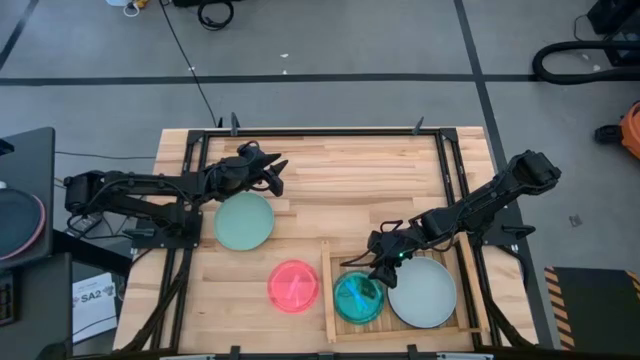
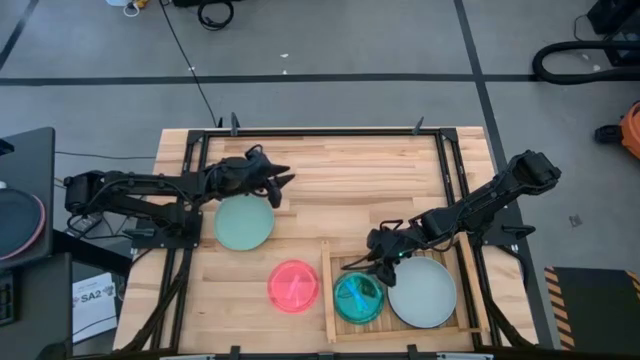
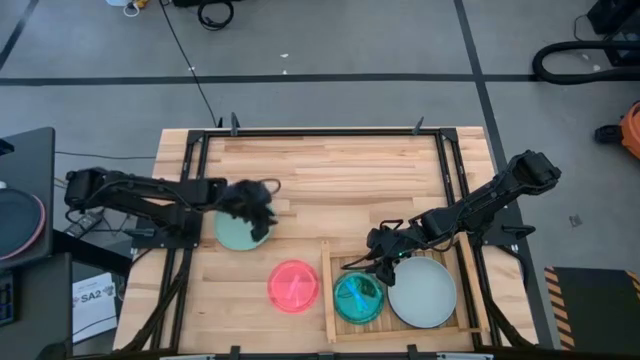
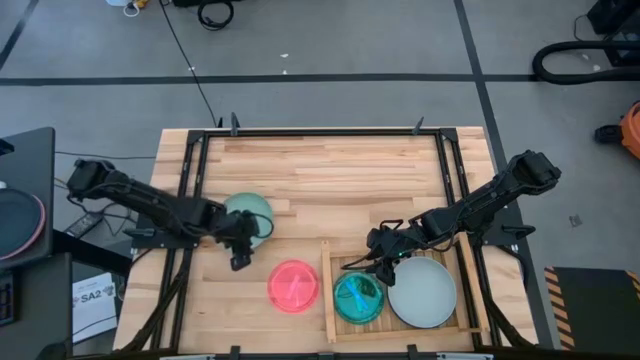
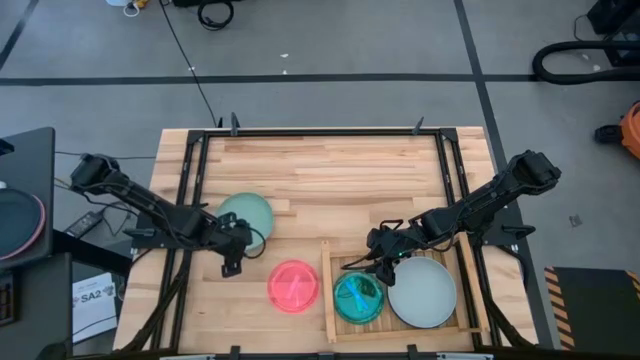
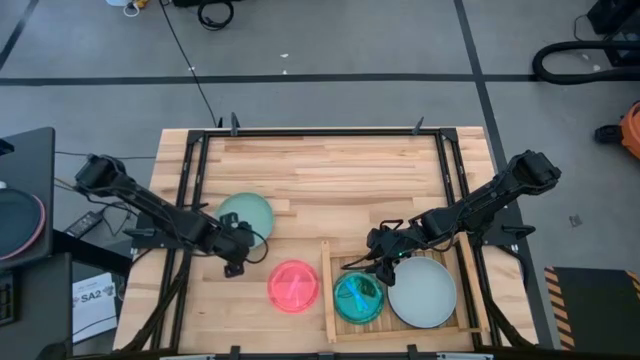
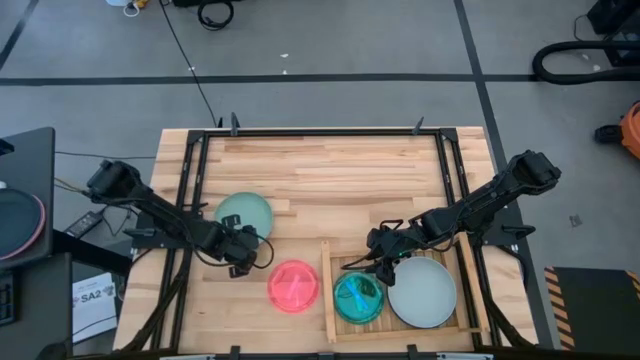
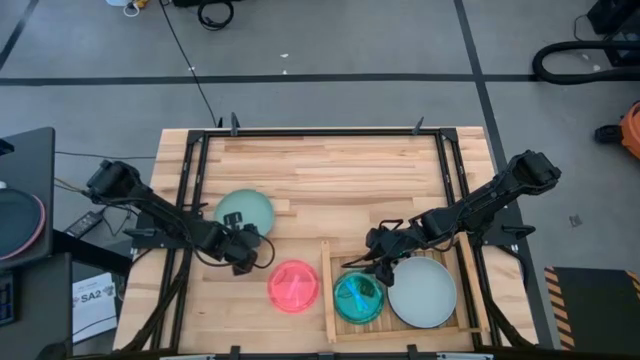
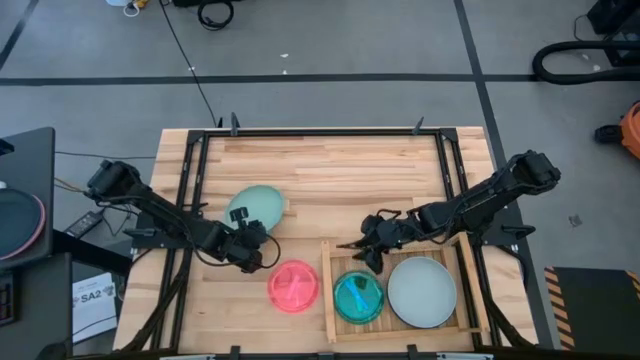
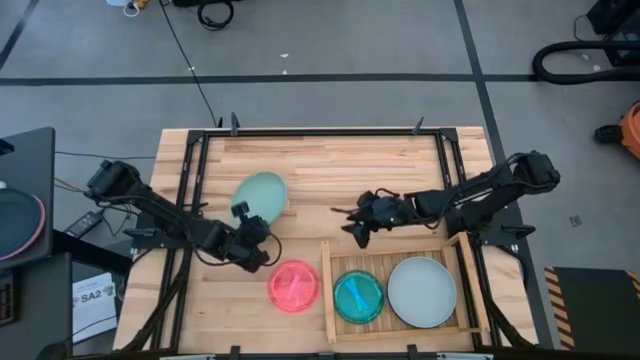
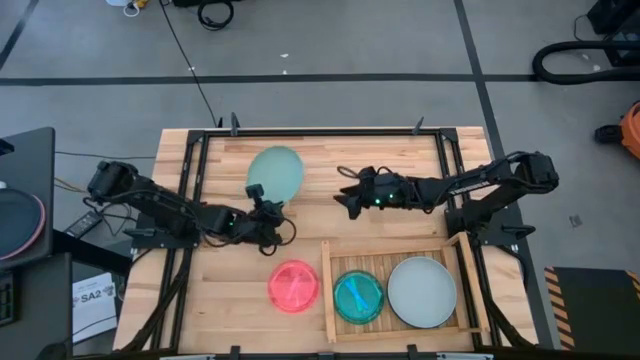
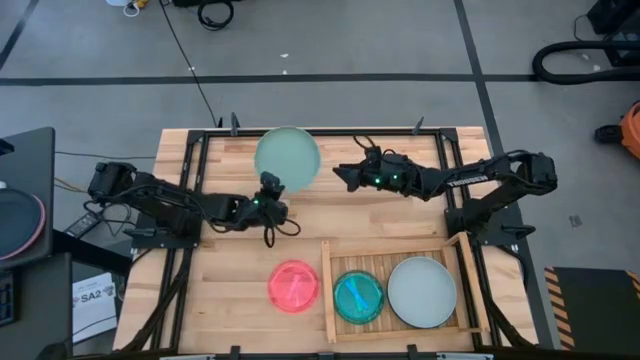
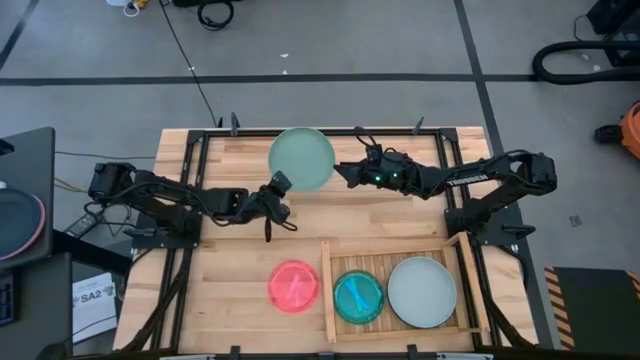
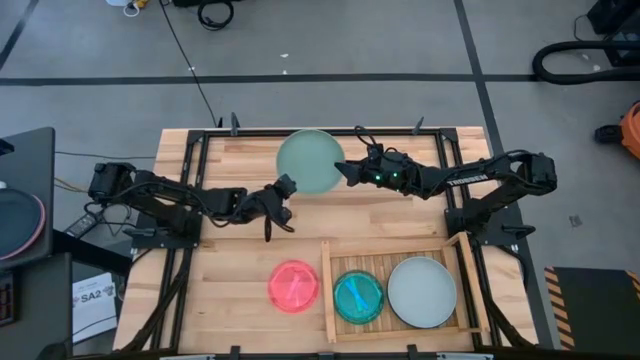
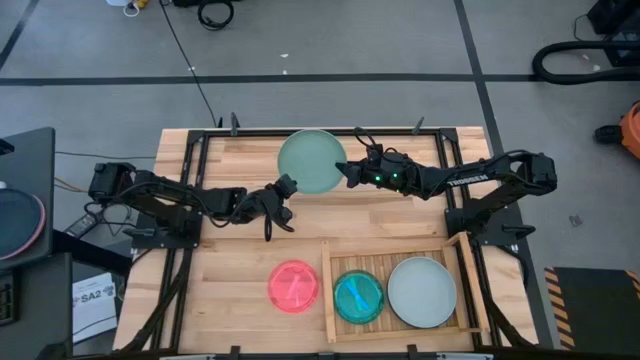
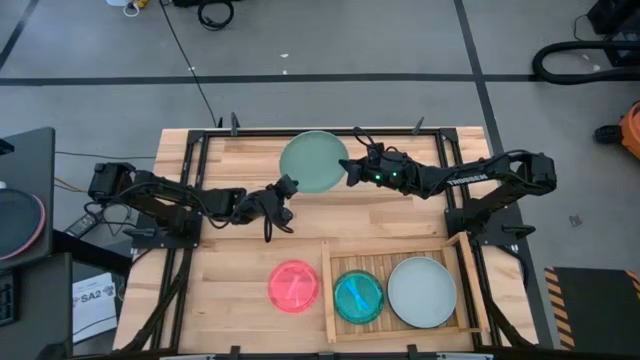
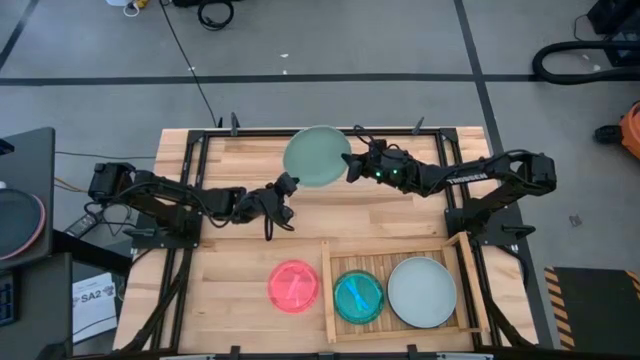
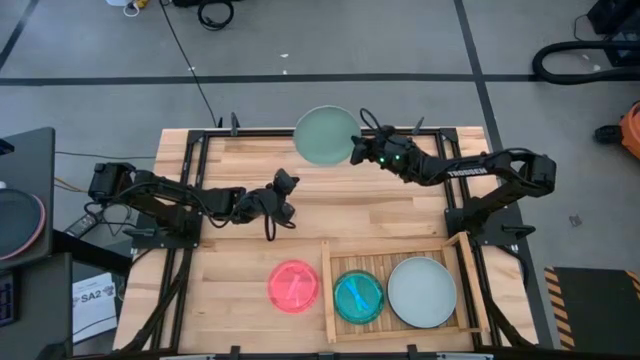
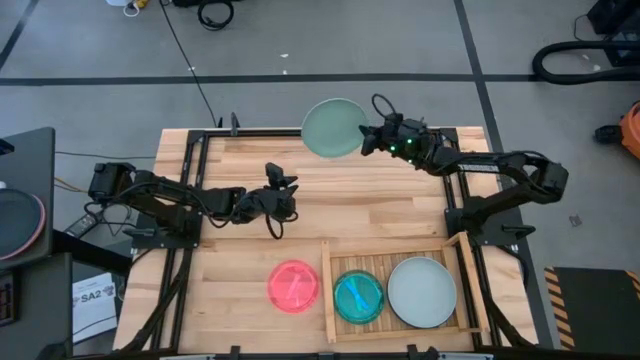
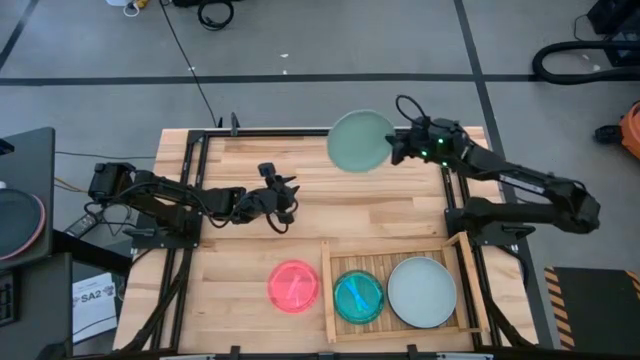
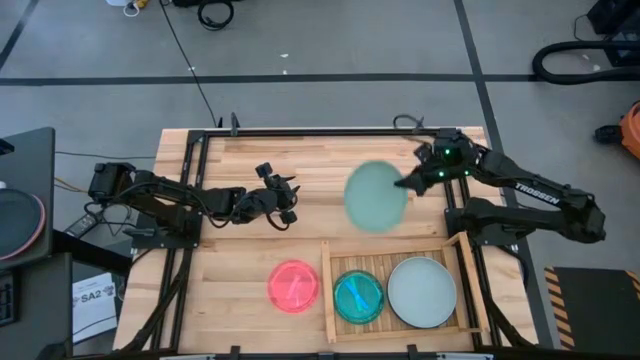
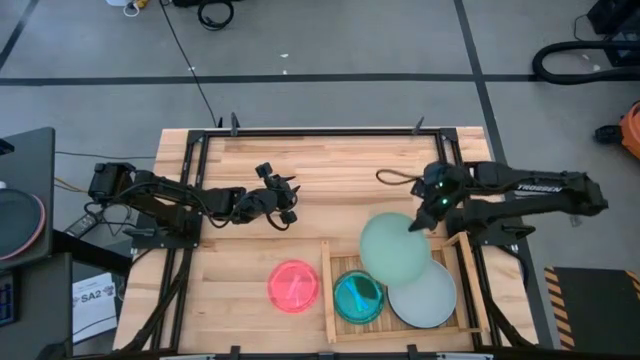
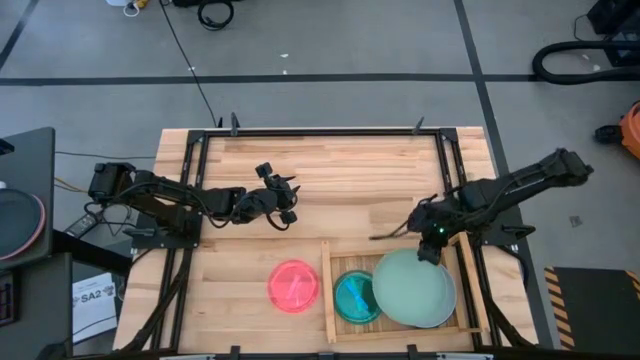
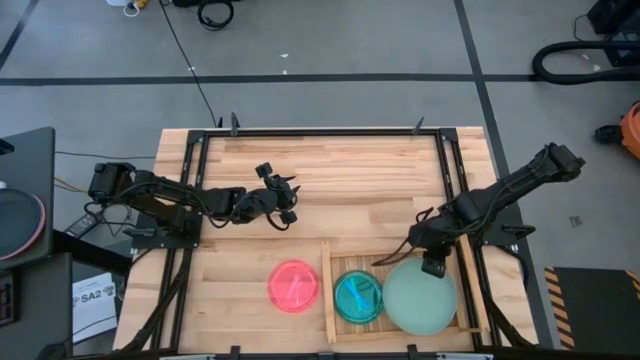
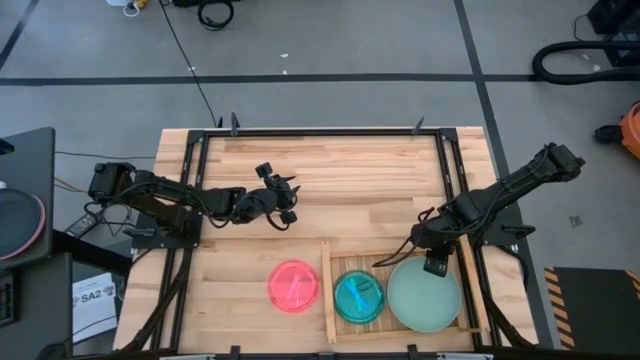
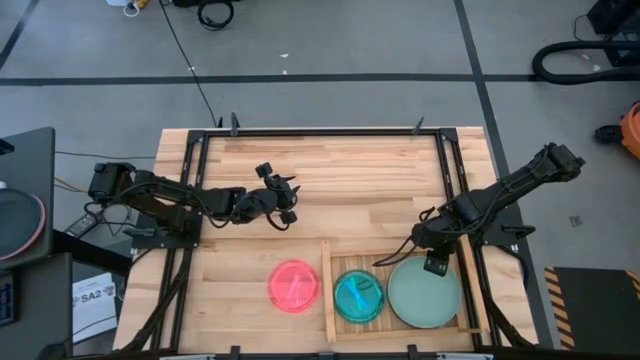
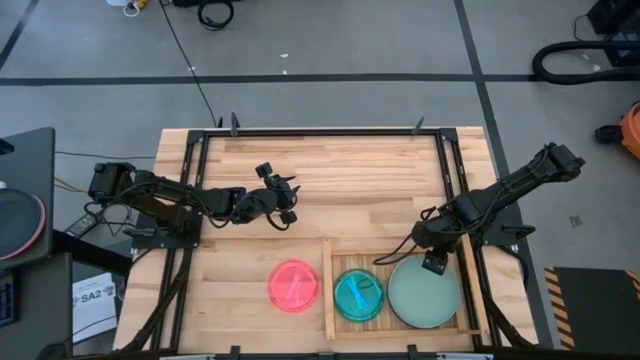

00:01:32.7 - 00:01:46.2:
Task: Place and stack plates onto a shelf
Stack the green plate on the gray plate on the shelf

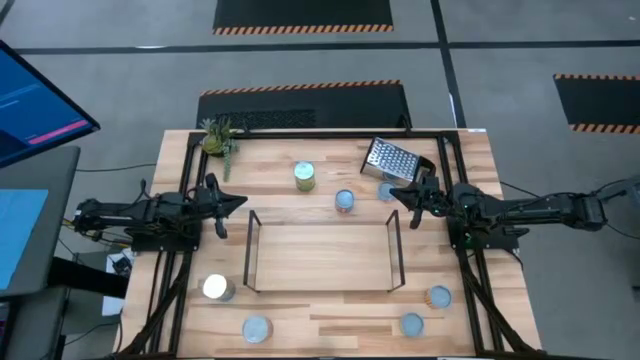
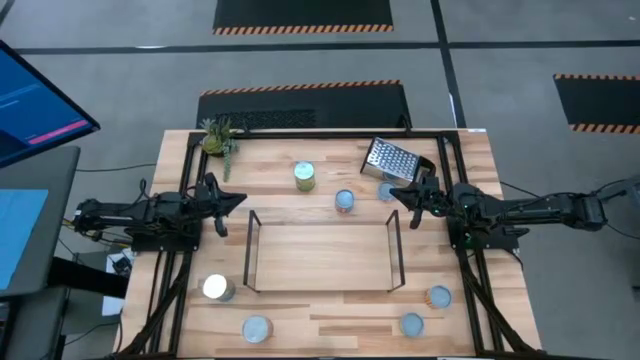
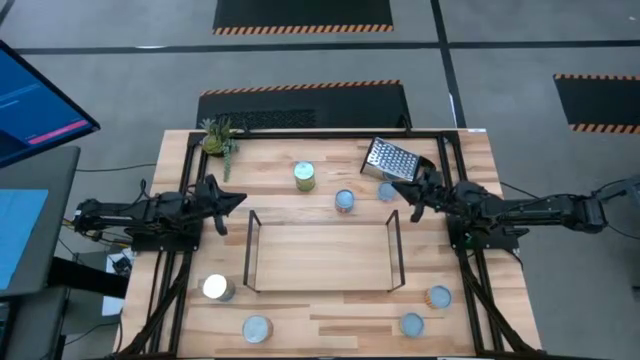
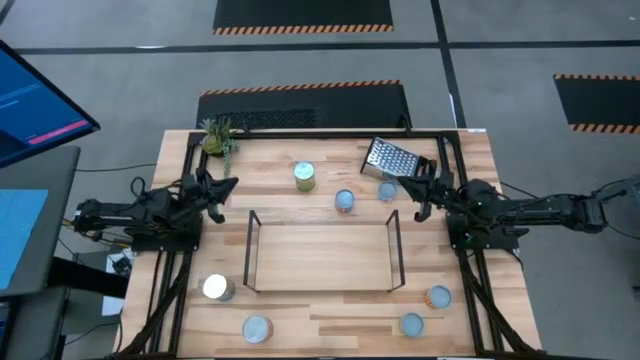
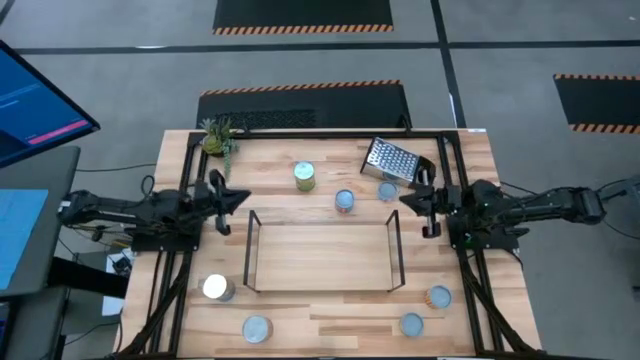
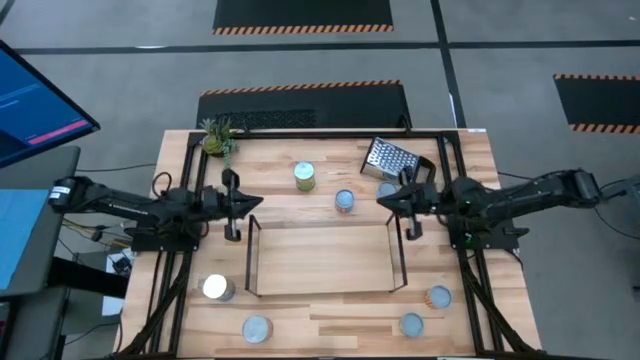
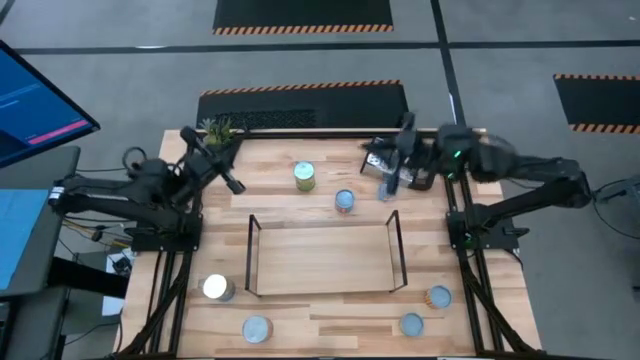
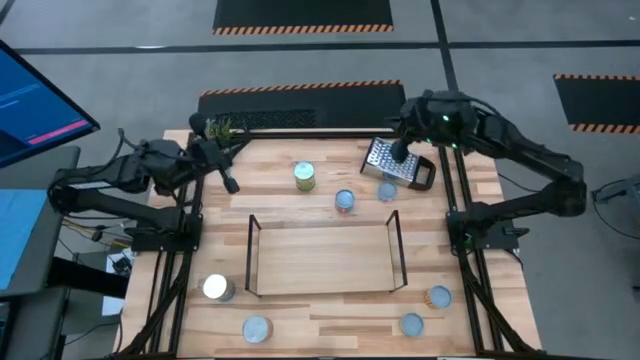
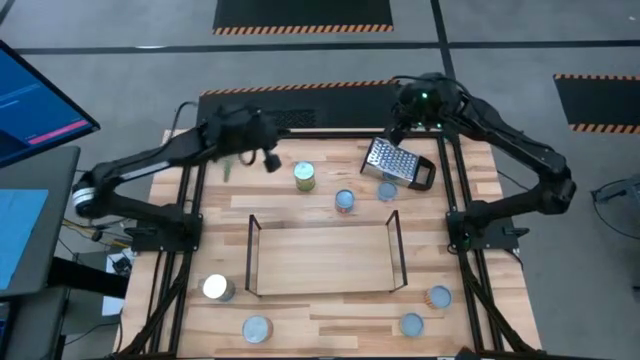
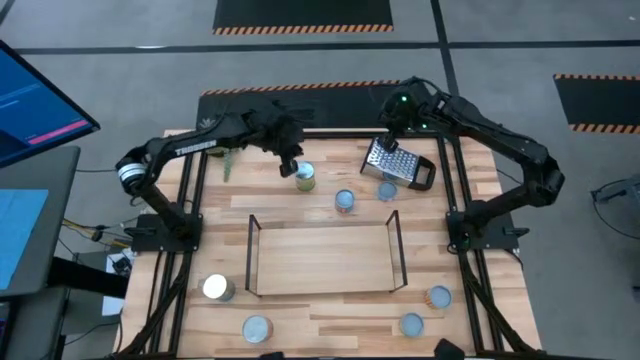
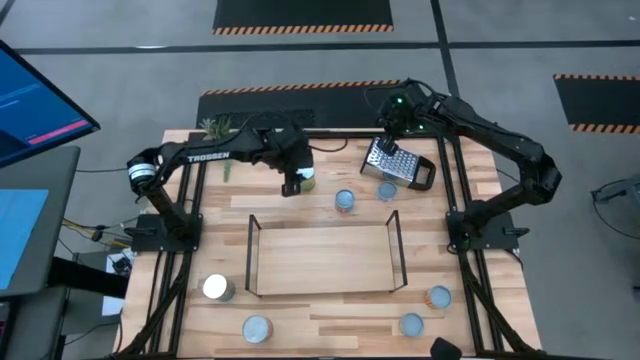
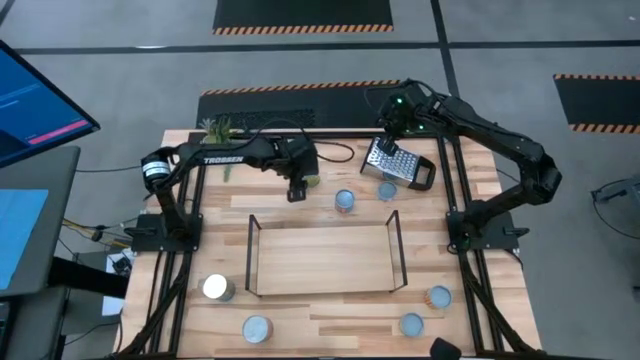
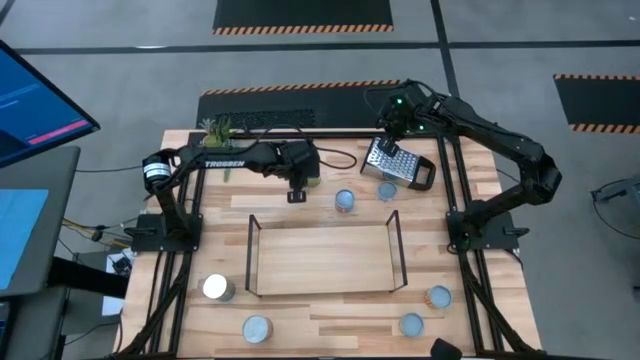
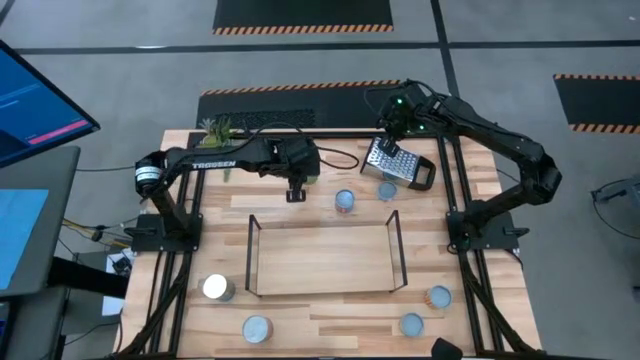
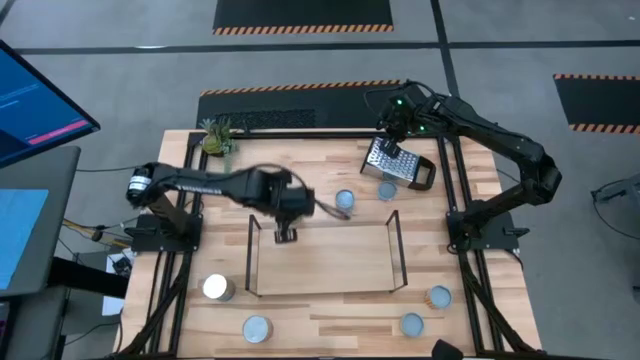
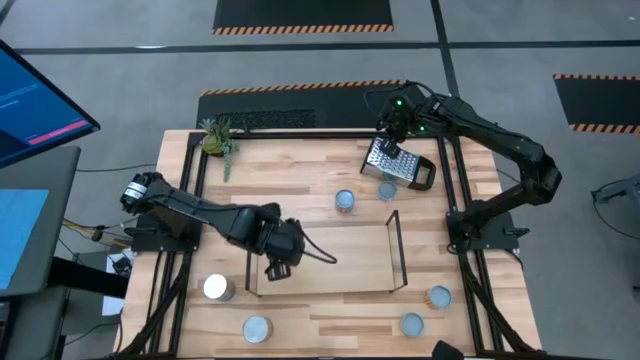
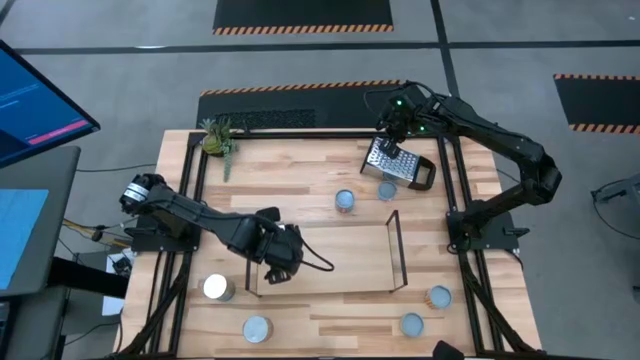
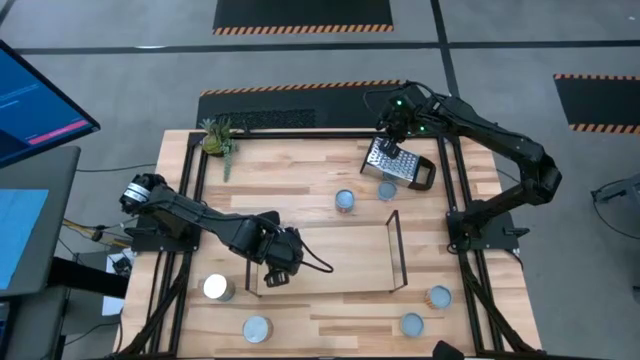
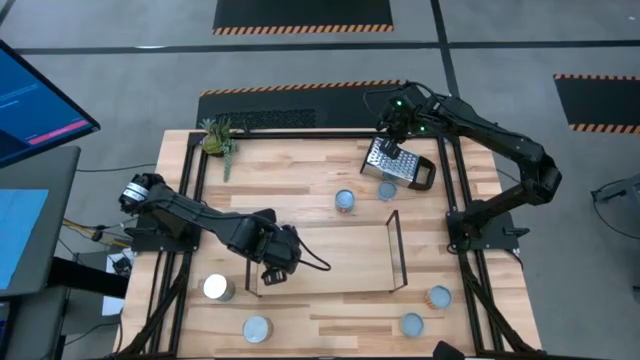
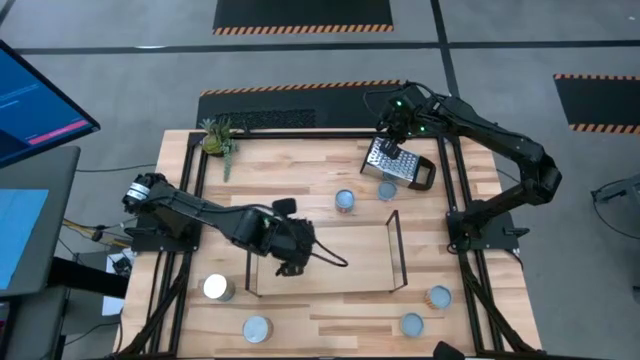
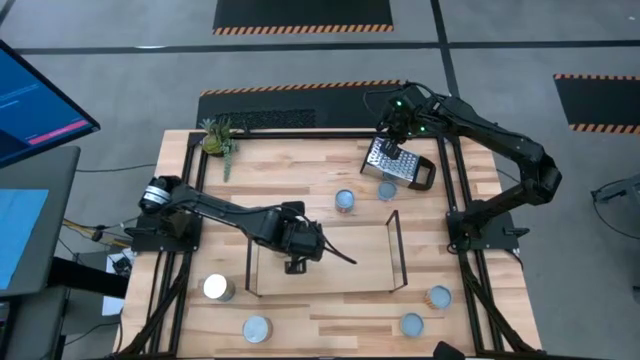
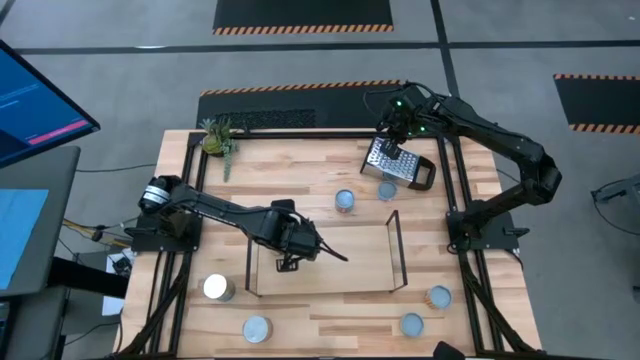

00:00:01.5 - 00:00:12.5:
Task: Pick and place cans onto a shelf
Put the canned pears on the shelf
